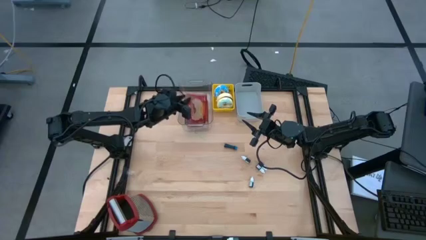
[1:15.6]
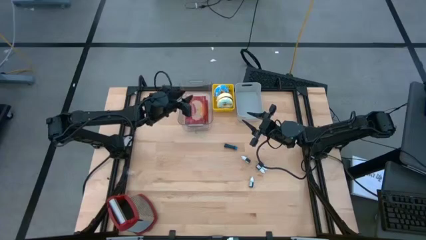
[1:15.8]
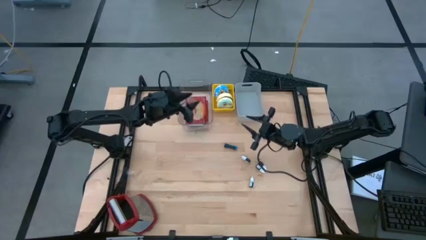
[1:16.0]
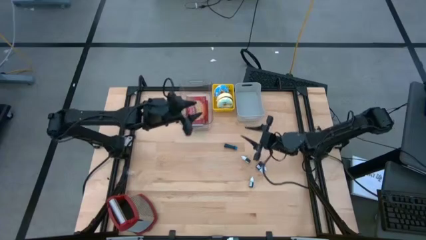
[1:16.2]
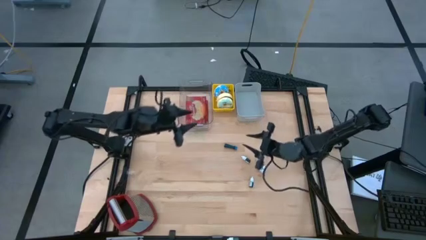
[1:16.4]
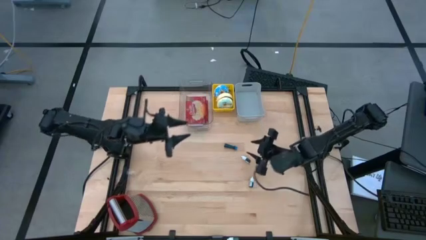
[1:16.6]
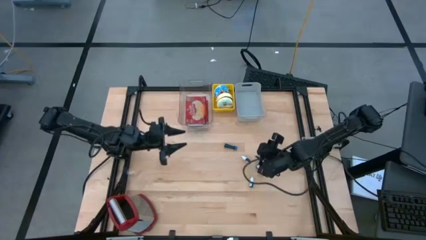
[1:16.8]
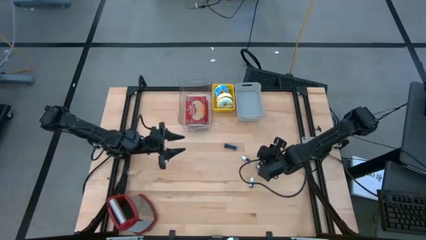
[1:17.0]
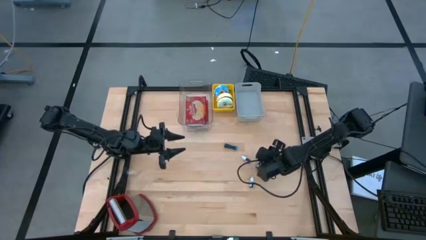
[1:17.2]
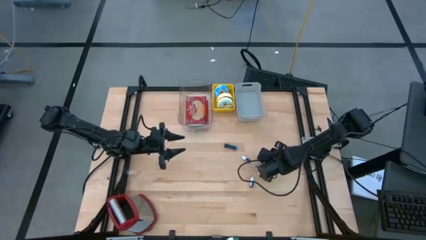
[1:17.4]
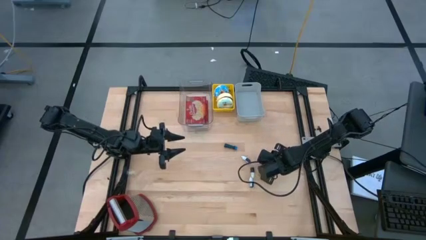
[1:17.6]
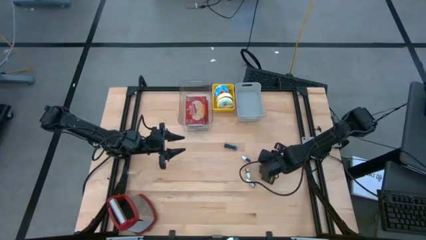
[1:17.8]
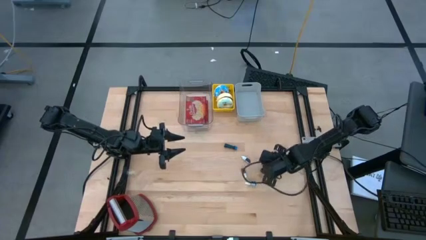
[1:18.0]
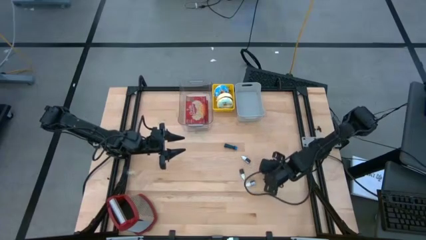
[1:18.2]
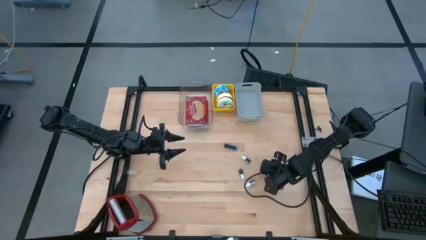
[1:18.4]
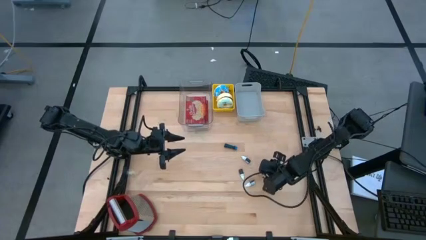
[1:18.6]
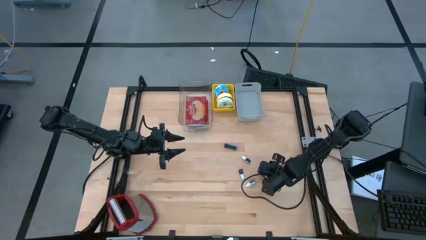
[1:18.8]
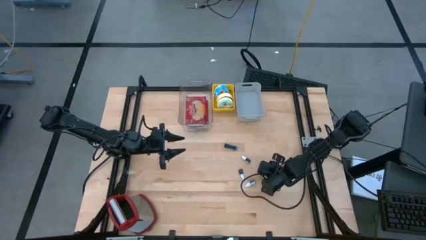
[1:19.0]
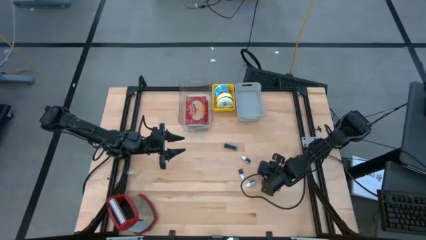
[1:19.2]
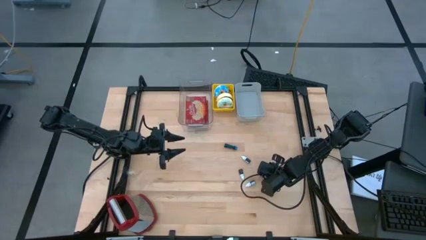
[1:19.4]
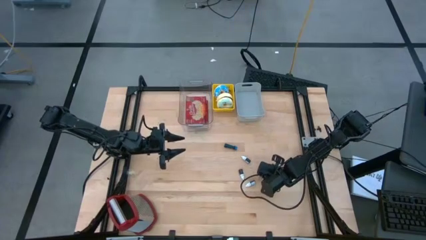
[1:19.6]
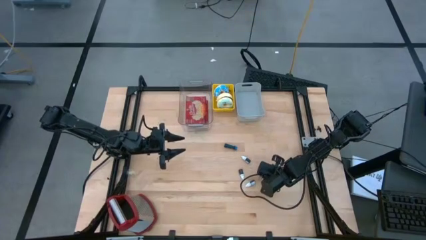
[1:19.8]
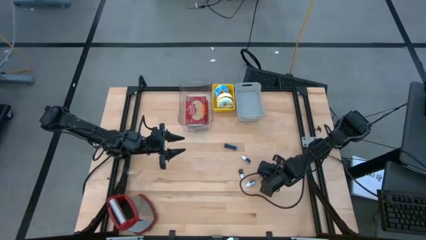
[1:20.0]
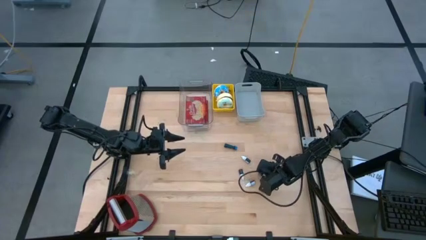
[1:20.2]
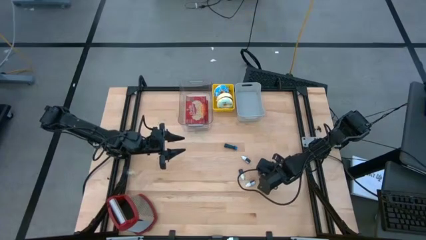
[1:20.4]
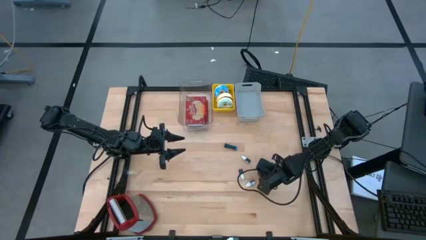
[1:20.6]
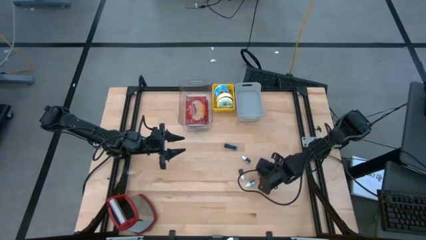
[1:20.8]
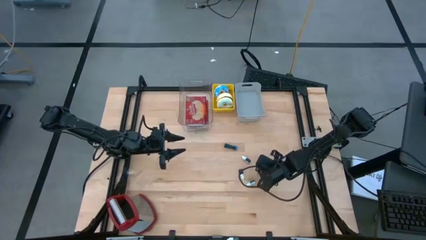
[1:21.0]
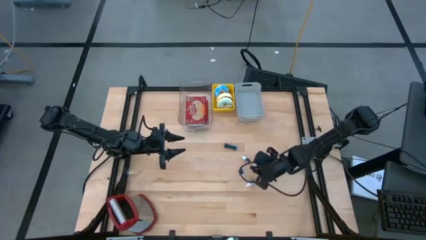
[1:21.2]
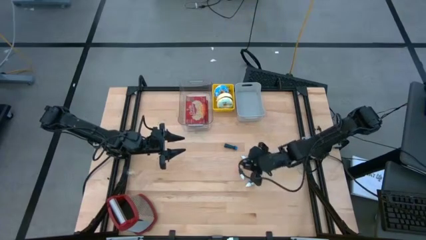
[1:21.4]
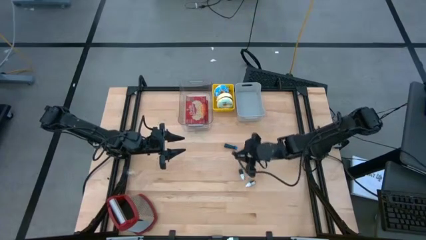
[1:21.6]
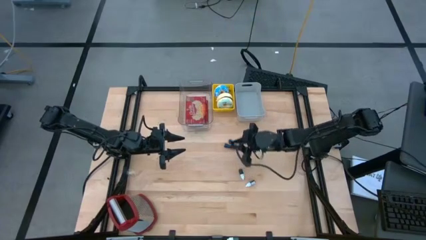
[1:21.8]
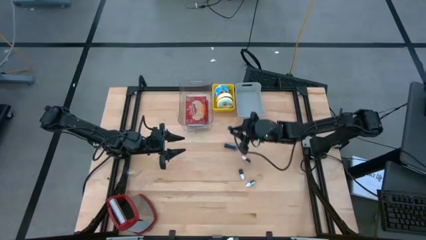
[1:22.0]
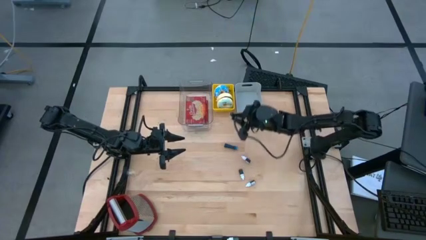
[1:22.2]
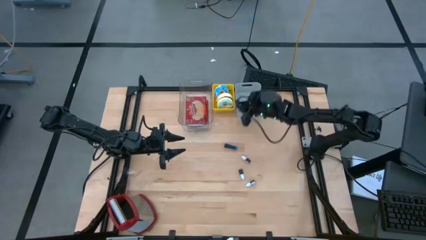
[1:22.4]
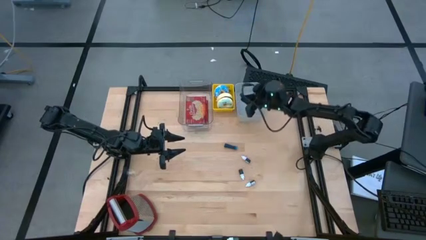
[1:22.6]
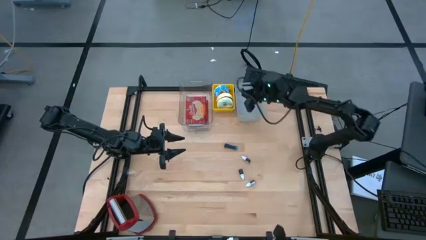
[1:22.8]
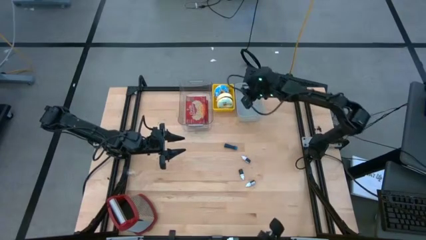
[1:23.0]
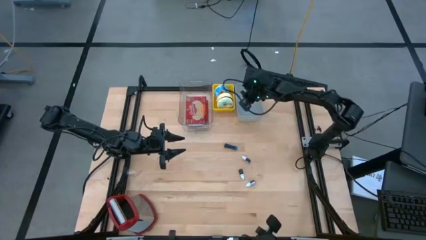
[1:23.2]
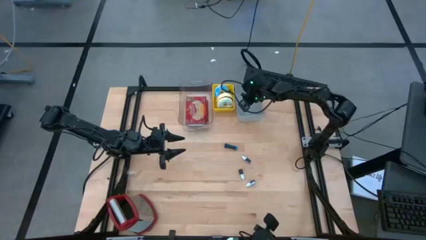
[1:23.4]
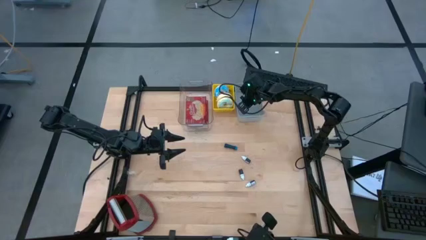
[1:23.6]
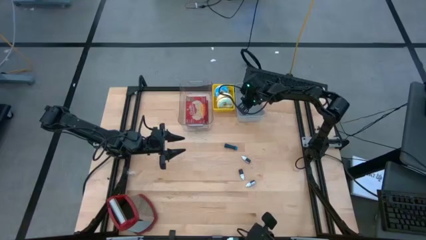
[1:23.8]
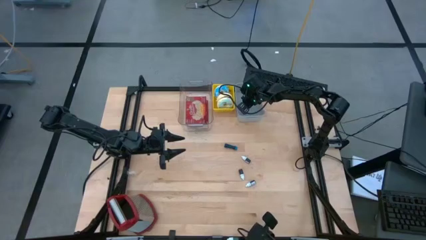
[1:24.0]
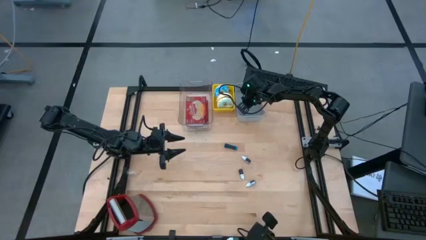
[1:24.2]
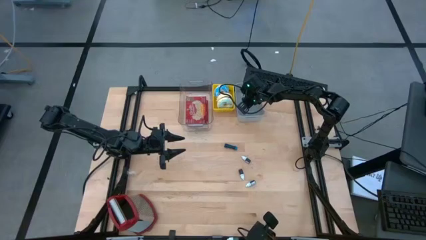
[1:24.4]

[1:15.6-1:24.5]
Put the violet food coloring bottle into the grey bin

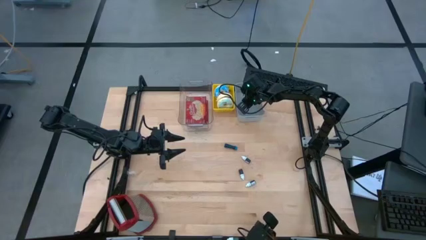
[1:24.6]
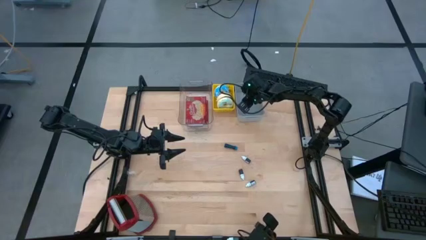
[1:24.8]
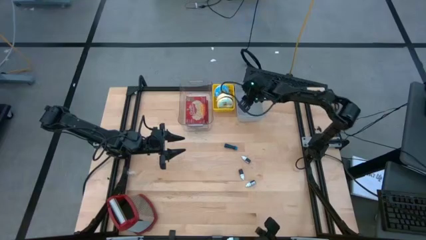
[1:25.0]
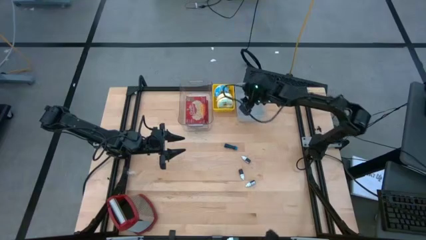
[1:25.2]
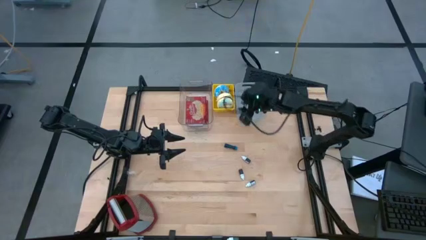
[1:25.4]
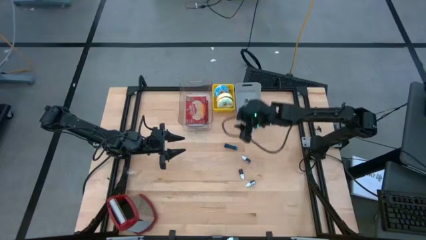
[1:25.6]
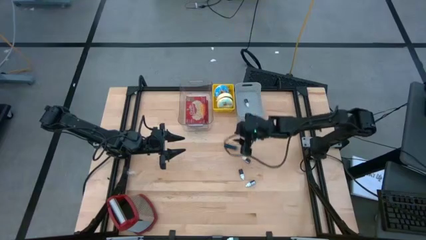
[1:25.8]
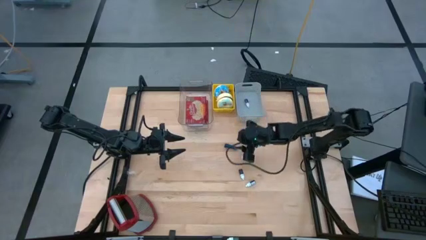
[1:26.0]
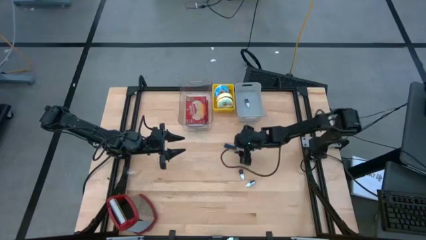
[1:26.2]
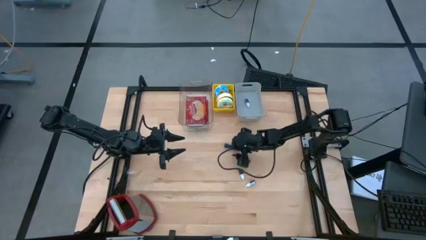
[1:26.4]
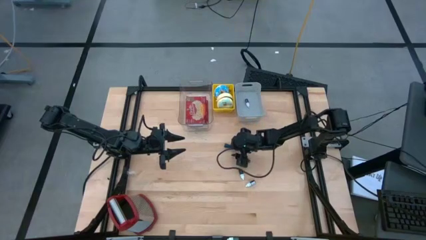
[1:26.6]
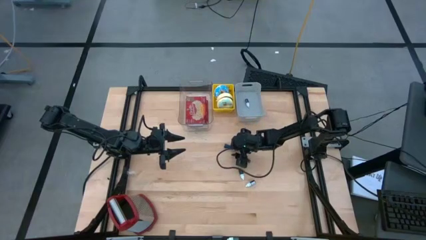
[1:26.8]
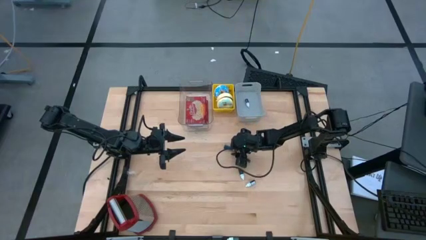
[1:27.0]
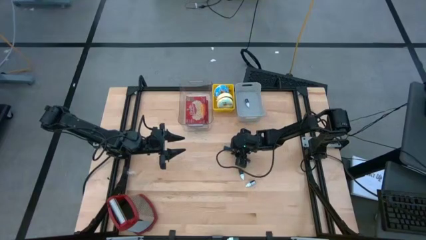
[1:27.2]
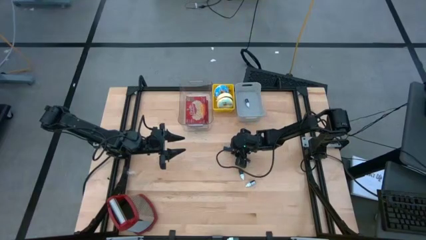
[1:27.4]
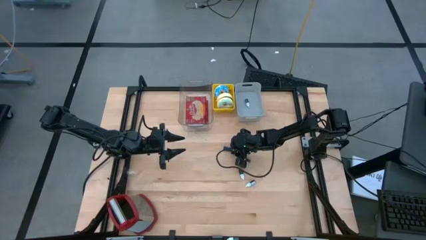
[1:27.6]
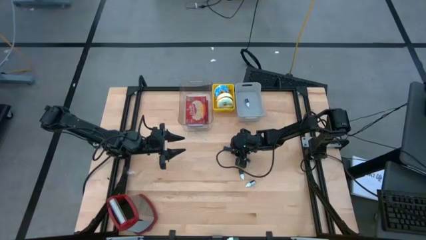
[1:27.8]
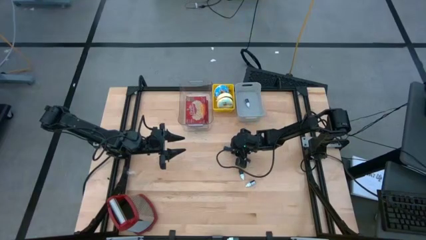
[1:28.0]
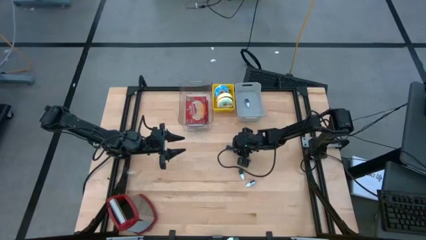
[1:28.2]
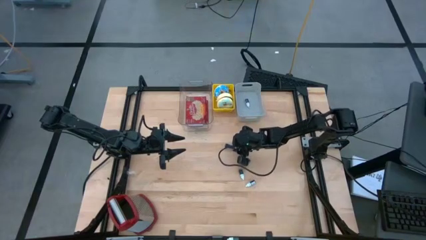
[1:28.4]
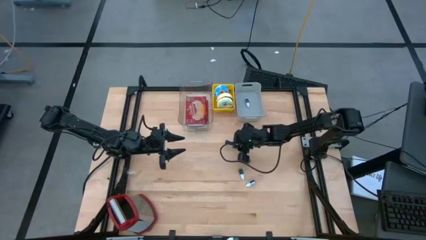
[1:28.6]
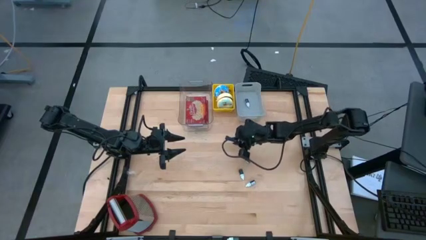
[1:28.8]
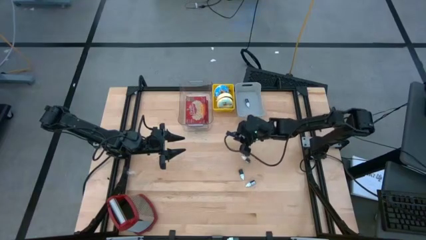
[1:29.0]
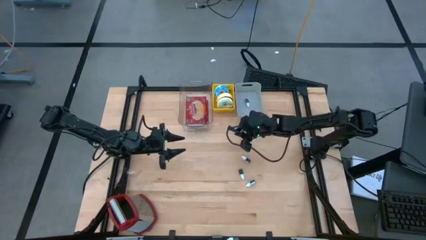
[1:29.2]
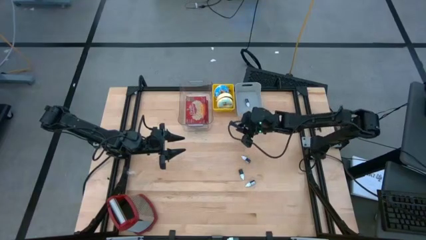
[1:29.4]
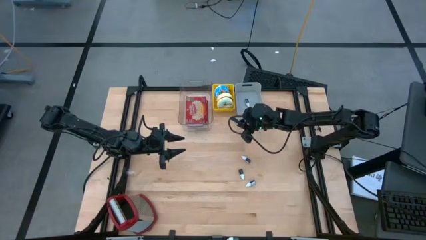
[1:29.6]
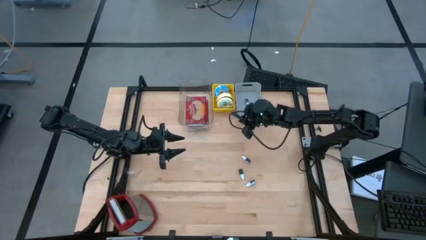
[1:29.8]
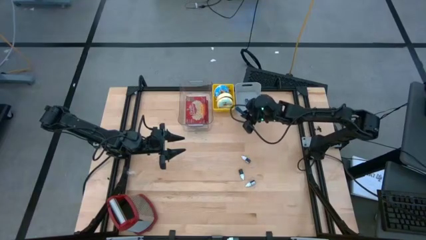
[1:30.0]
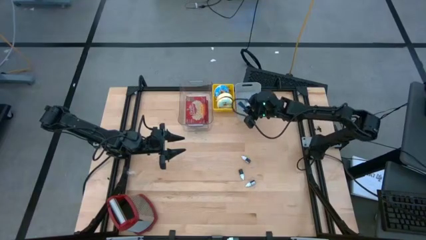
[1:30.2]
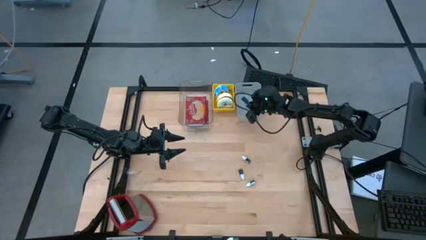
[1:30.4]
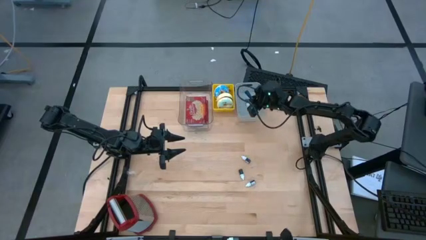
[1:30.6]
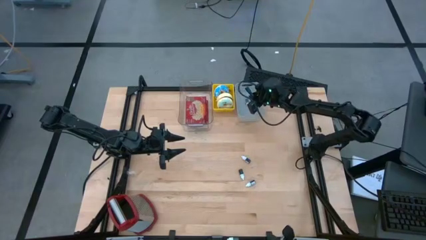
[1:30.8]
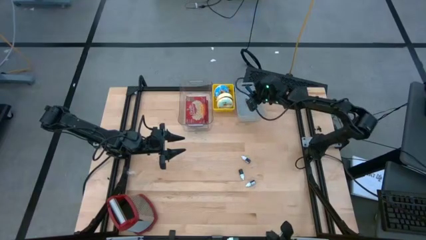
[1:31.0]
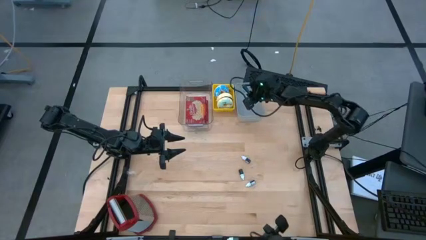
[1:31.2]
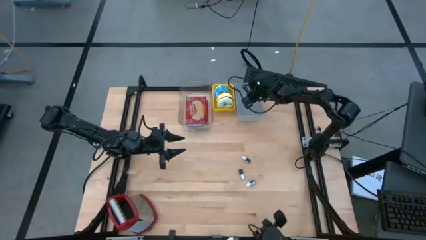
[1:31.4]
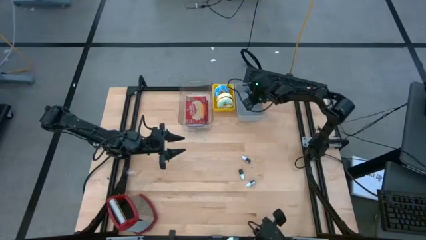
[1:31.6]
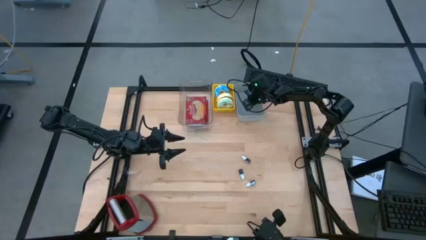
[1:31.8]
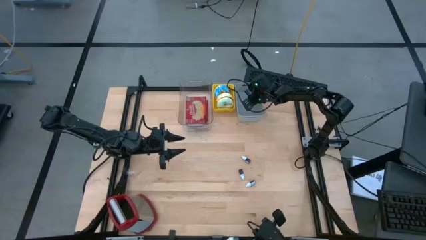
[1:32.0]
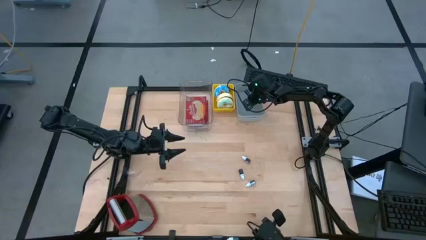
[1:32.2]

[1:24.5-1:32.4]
Put the big blue food coloring bottle into the grey bin
